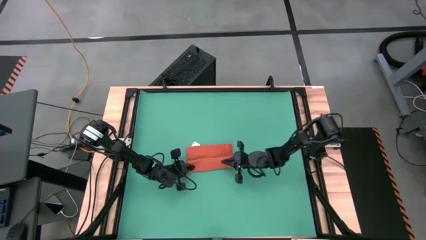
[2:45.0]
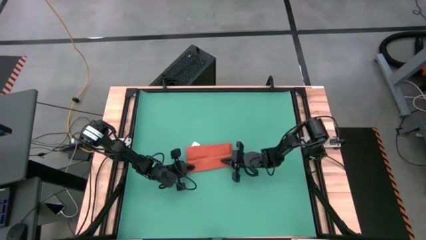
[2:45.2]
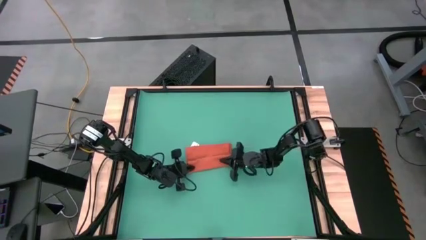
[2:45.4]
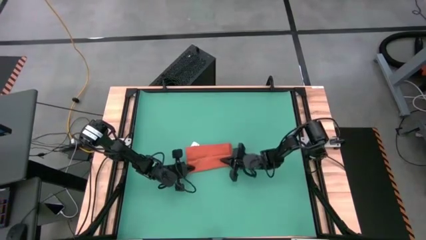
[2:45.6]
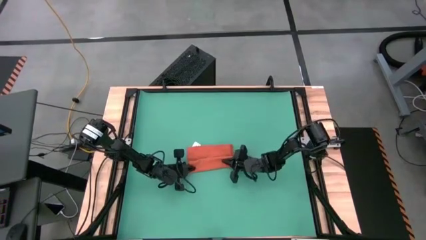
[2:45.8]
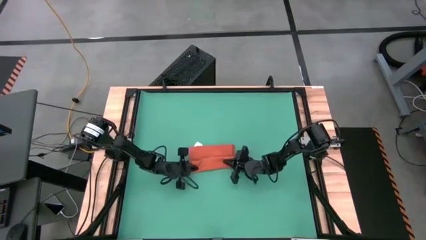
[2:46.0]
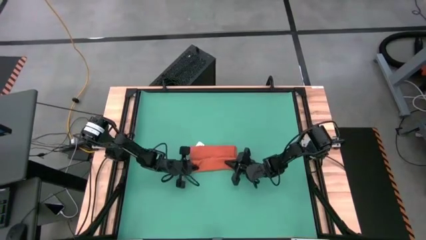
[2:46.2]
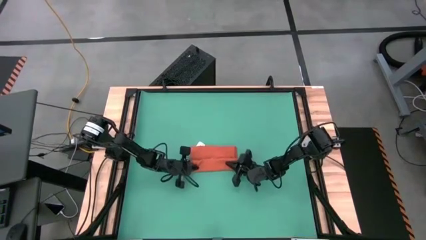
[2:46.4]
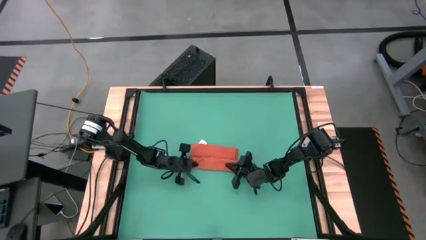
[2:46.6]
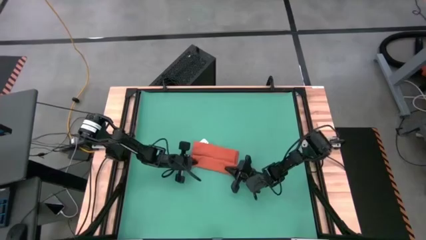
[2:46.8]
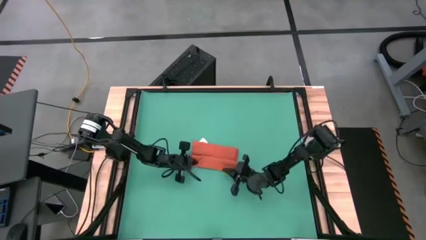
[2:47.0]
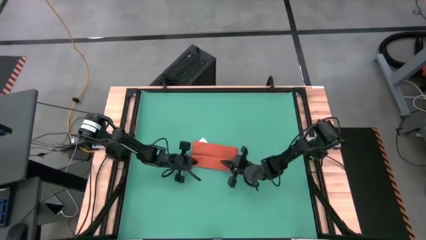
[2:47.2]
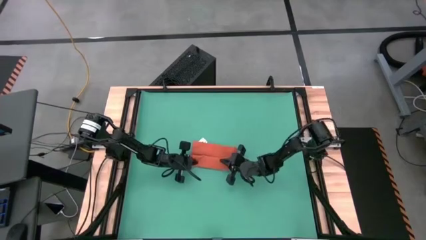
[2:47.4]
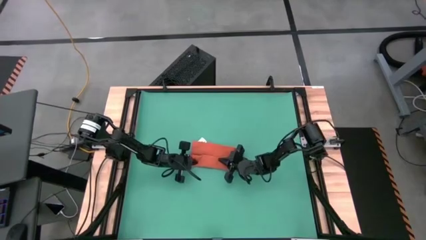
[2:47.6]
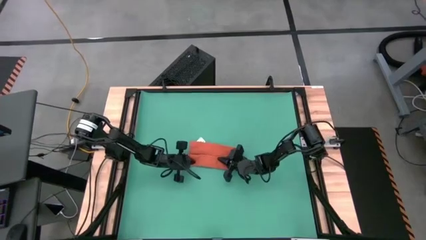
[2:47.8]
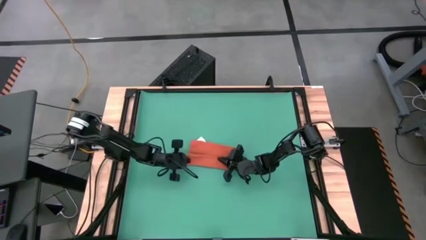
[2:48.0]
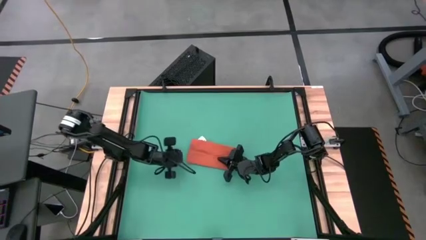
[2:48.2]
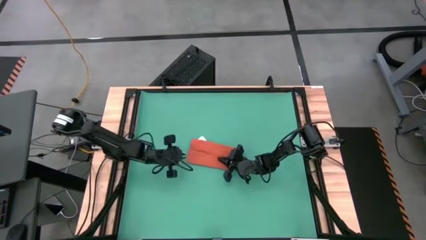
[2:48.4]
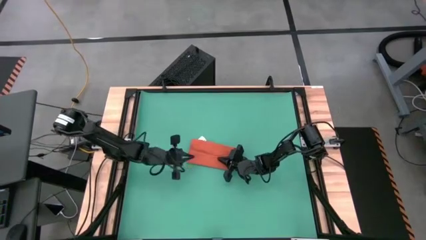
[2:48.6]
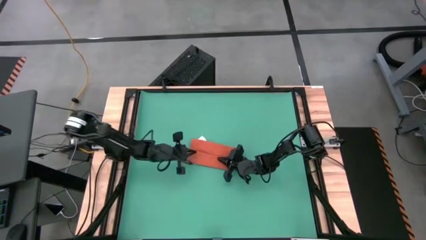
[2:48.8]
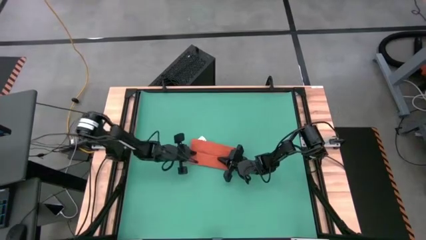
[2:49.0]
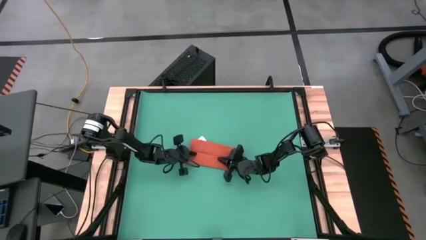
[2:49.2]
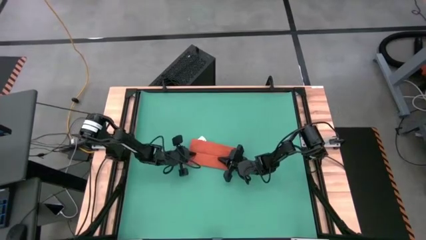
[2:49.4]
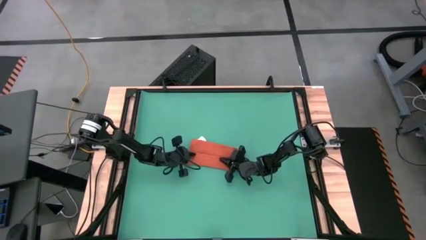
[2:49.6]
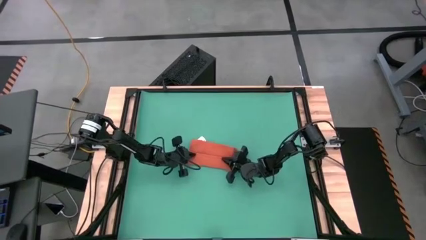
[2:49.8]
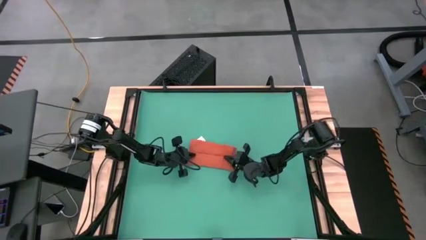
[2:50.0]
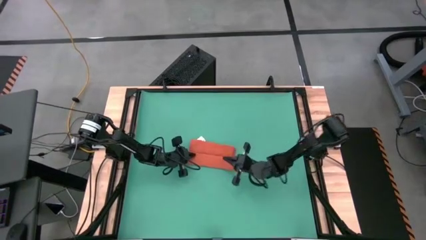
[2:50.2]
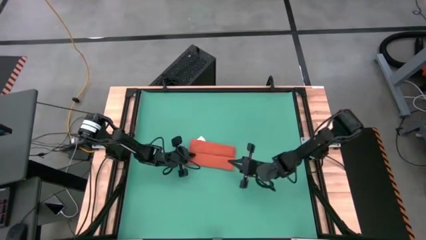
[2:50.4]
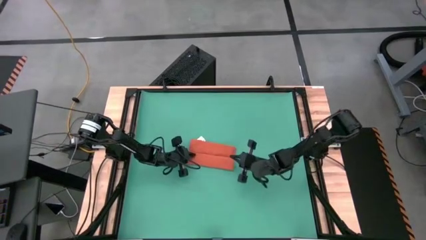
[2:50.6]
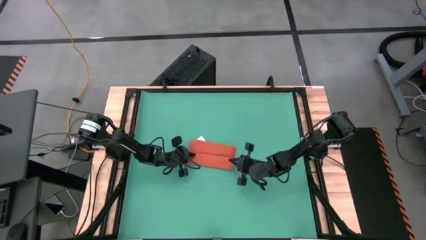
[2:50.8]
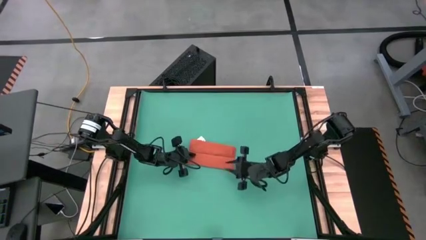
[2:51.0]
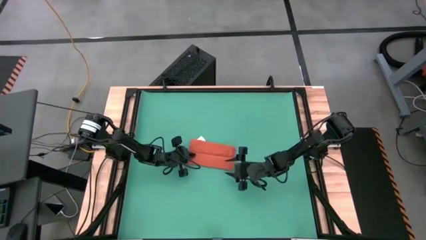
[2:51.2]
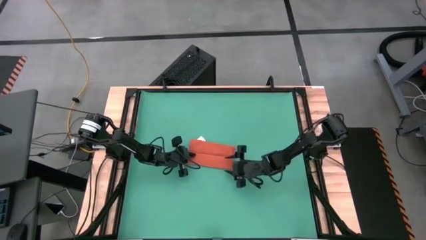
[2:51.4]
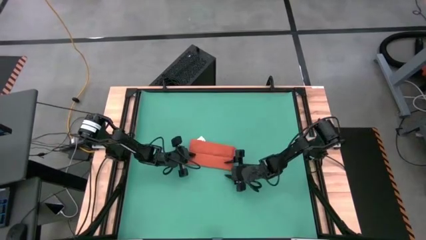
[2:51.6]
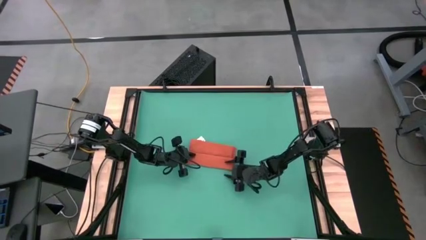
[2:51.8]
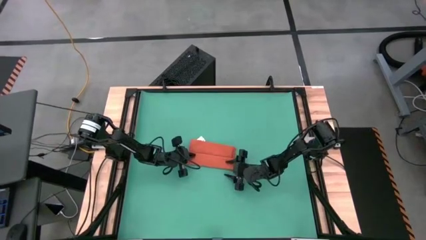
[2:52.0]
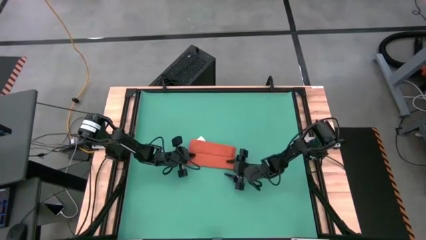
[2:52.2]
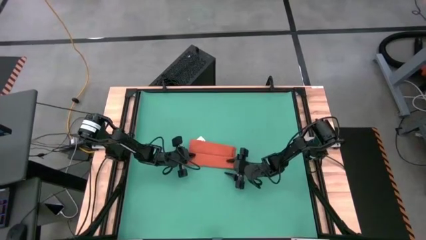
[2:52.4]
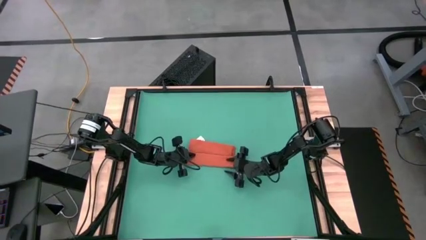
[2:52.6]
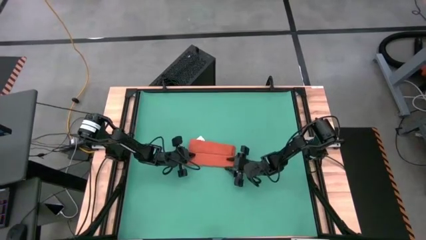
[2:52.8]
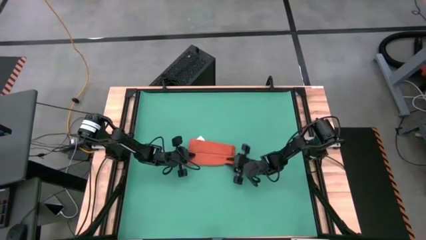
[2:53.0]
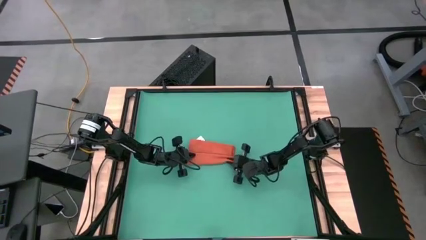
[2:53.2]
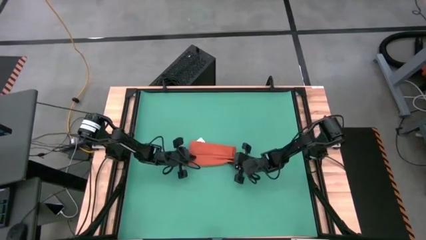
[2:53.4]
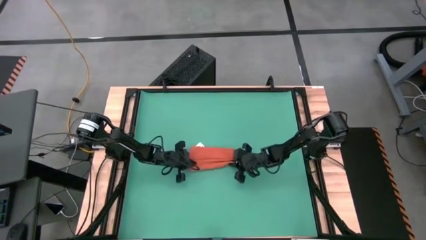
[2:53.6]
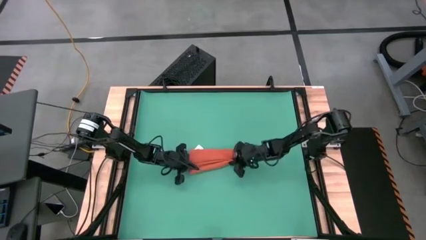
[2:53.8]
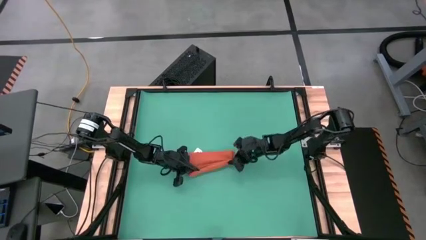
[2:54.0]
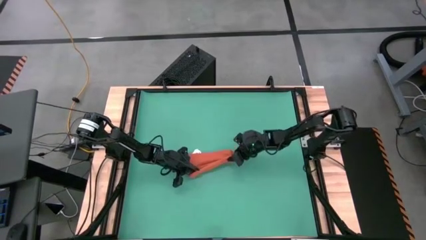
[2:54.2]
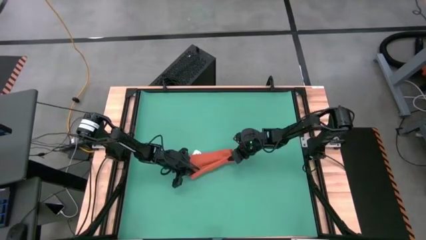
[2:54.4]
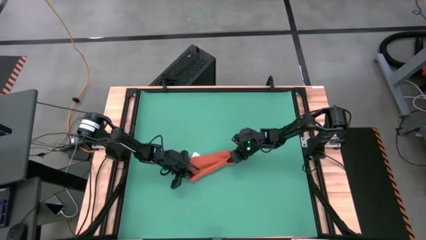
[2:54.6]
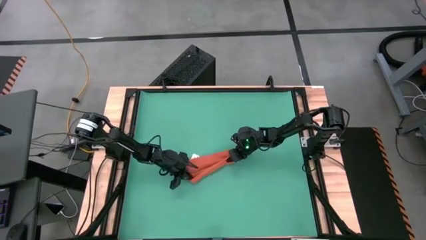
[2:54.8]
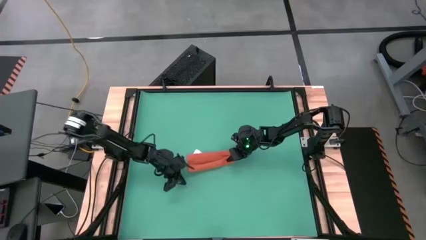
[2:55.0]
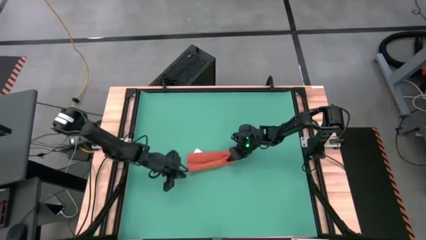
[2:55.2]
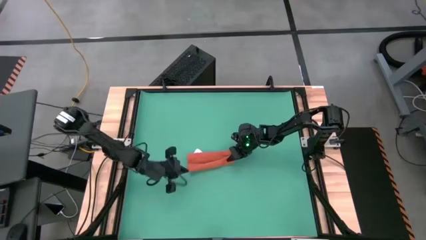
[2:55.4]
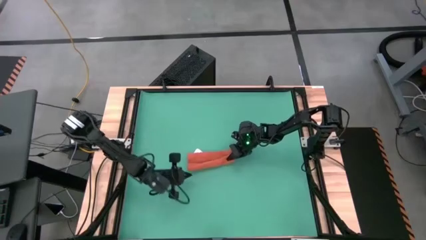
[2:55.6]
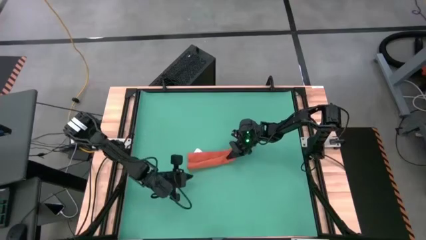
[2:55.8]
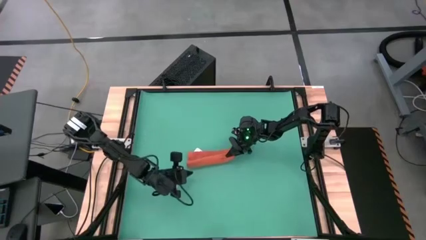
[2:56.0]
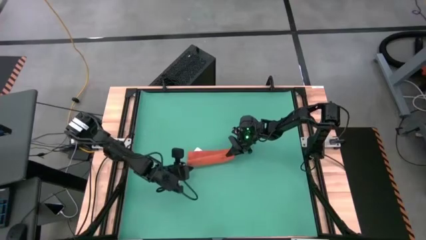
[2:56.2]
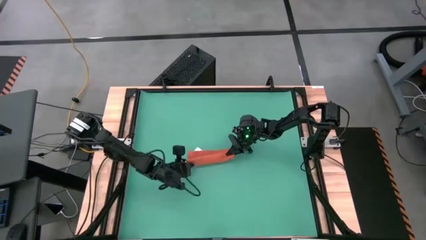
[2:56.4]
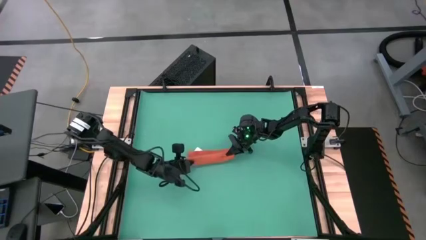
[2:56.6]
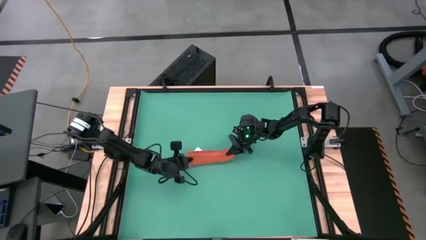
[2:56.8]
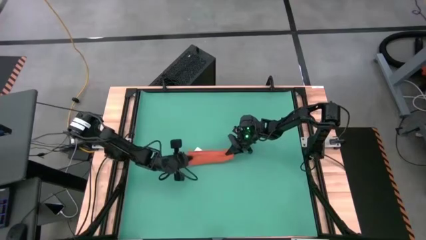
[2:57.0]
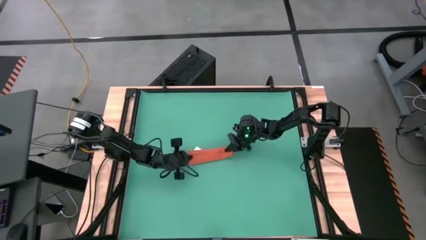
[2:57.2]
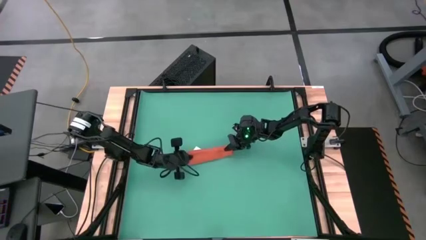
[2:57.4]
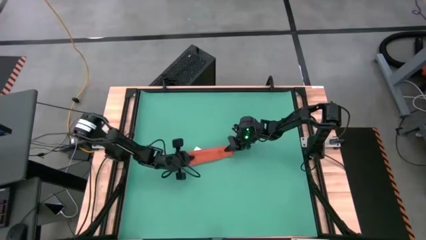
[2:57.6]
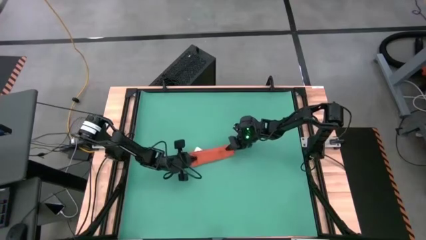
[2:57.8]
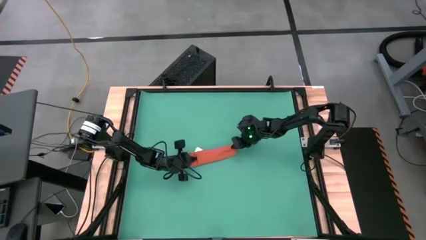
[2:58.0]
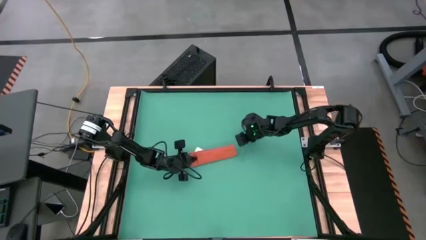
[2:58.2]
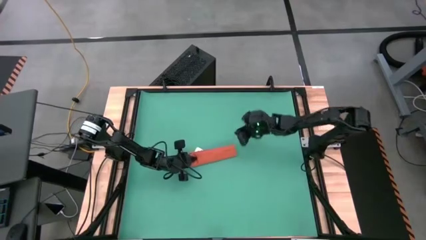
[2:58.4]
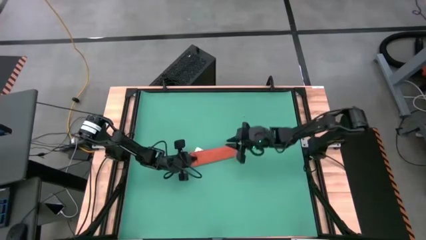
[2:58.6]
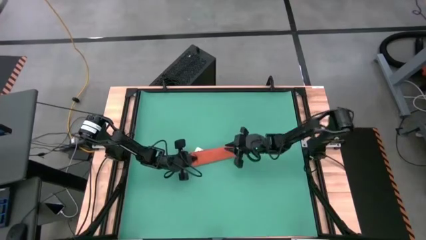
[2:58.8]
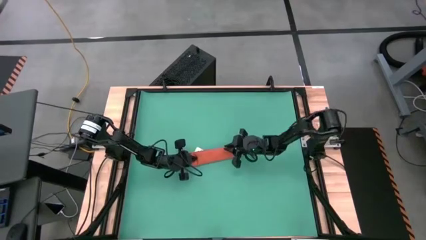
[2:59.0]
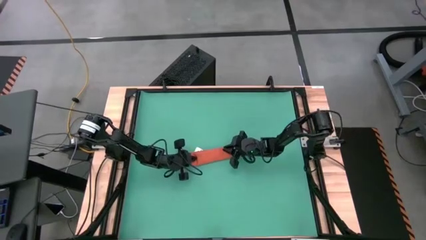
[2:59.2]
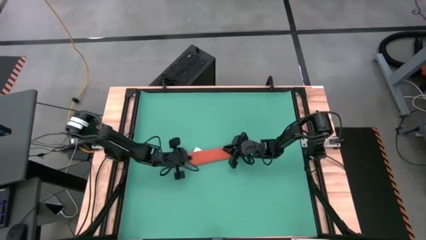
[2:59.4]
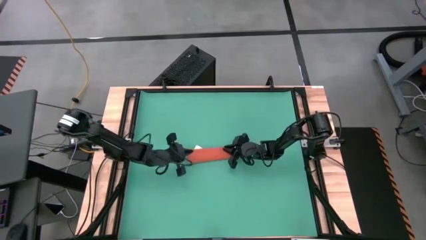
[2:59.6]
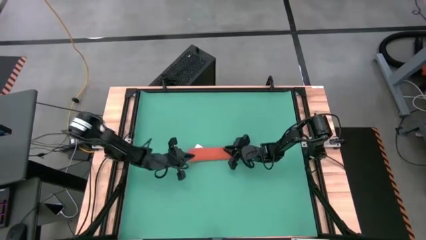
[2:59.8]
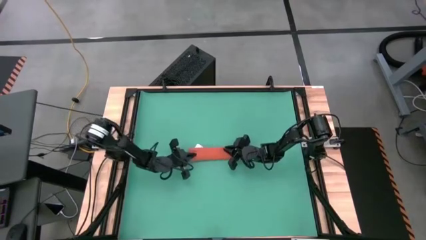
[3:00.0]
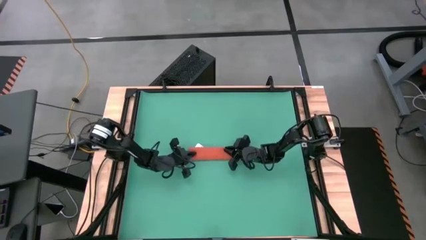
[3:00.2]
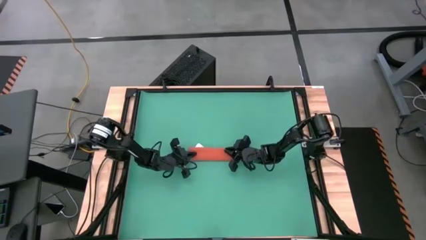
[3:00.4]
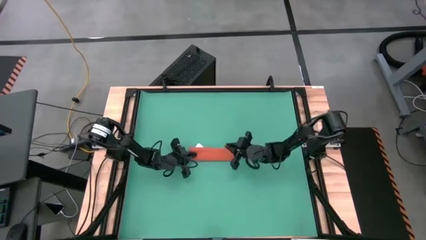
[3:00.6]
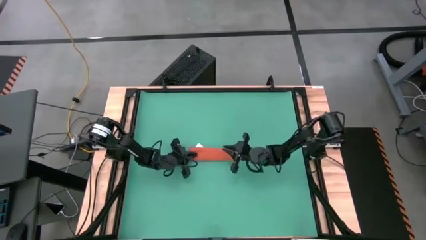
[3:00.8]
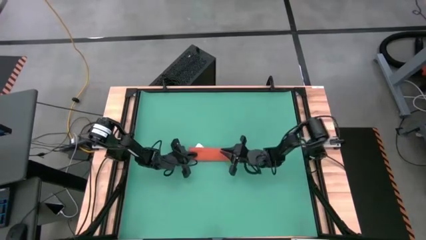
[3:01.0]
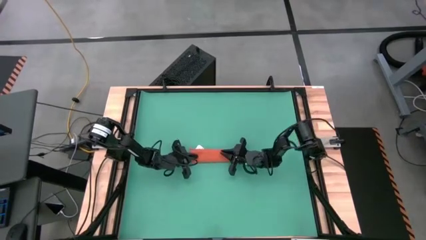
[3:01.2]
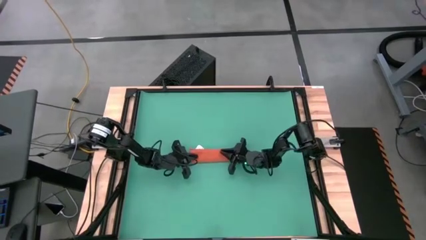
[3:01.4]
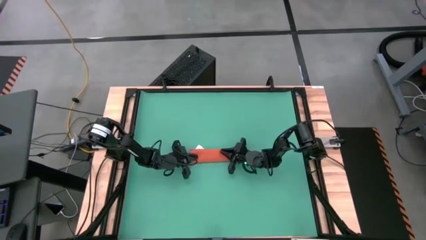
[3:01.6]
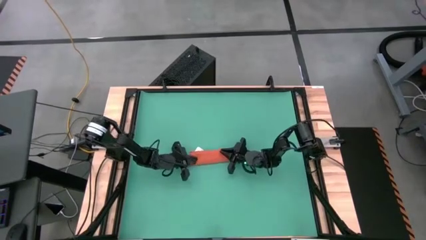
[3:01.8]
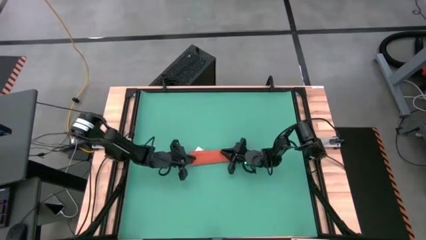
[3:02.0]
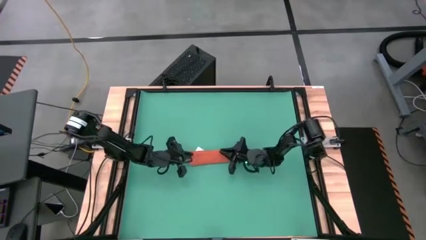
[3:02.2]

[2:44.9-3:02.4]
Task: Roll towel
Roll the orange towel
